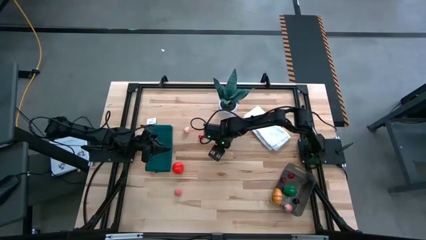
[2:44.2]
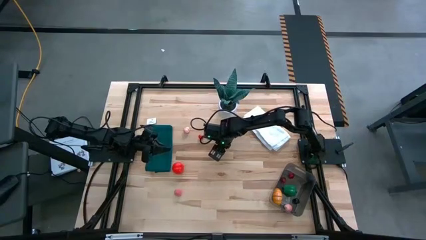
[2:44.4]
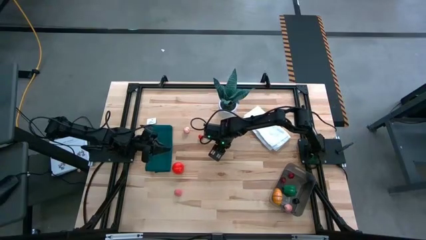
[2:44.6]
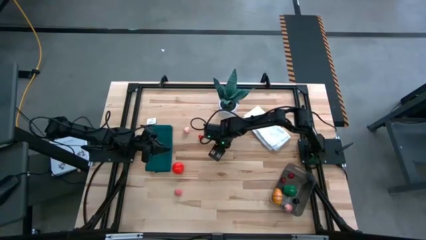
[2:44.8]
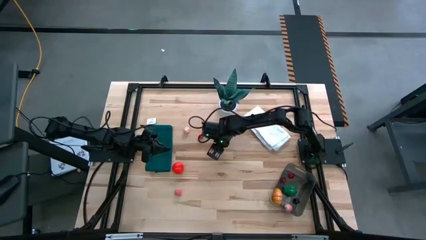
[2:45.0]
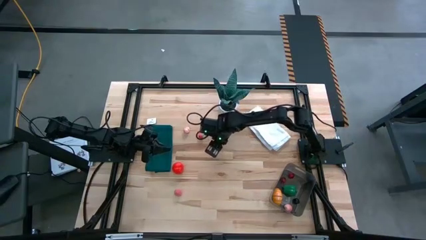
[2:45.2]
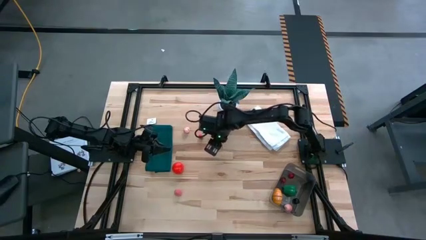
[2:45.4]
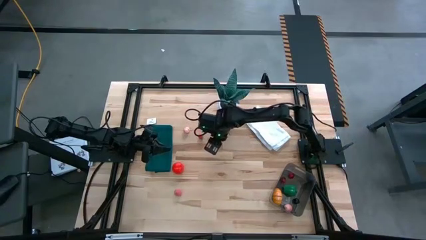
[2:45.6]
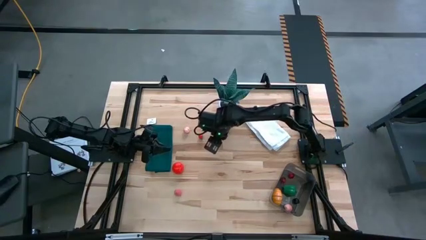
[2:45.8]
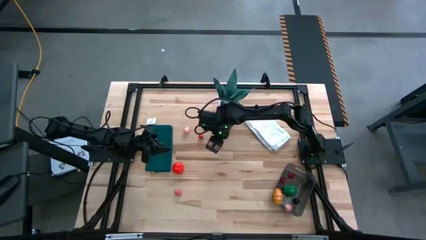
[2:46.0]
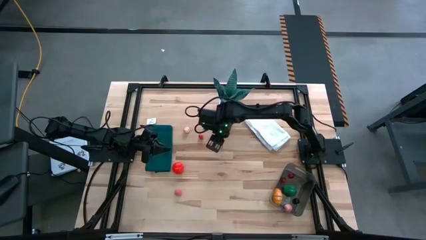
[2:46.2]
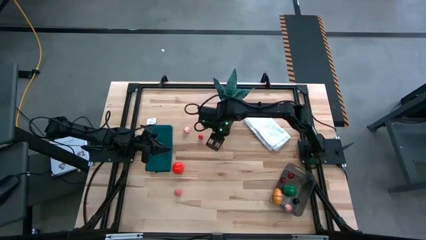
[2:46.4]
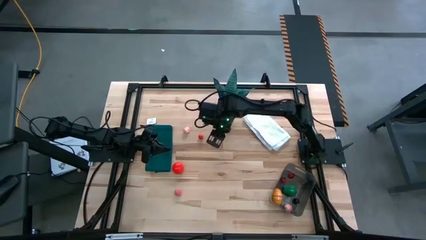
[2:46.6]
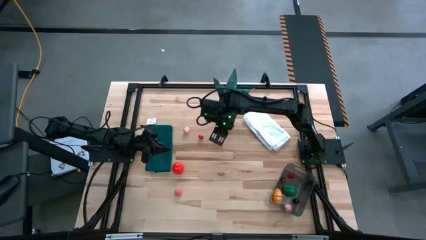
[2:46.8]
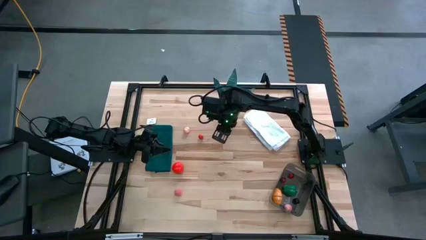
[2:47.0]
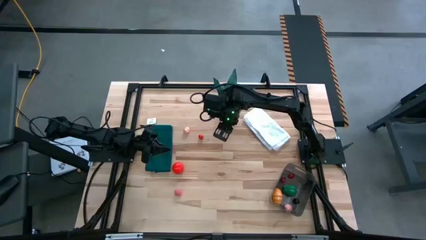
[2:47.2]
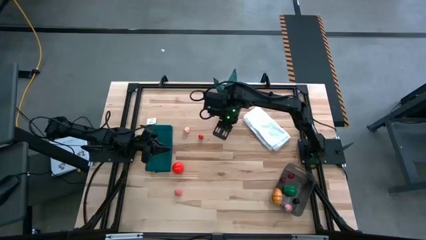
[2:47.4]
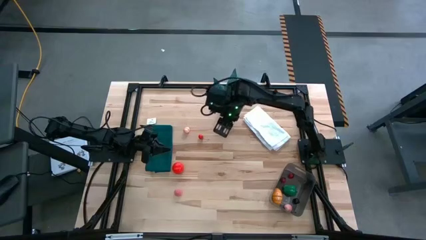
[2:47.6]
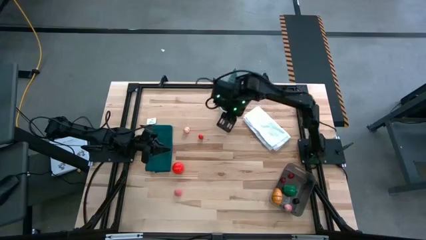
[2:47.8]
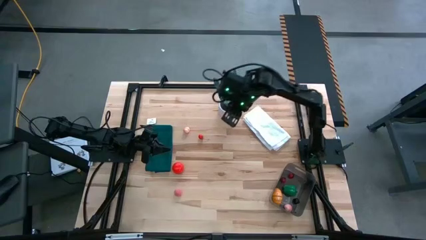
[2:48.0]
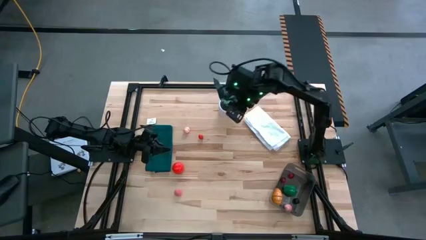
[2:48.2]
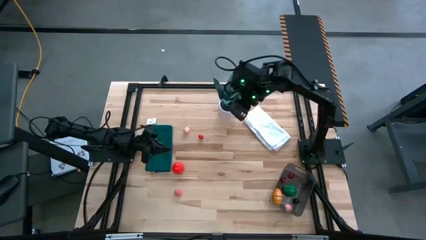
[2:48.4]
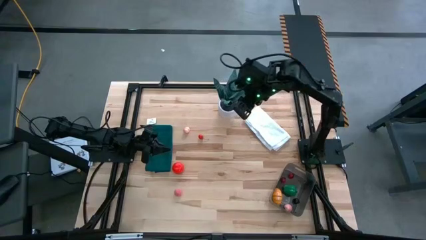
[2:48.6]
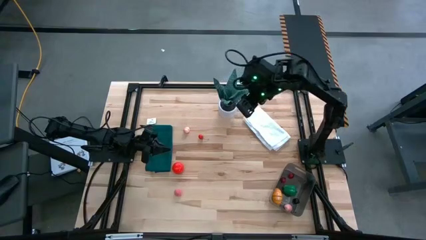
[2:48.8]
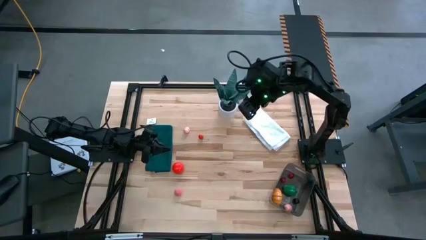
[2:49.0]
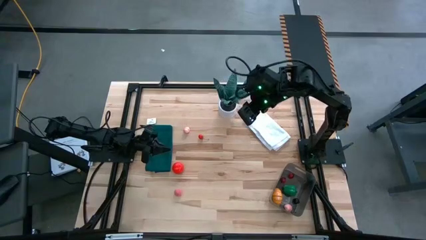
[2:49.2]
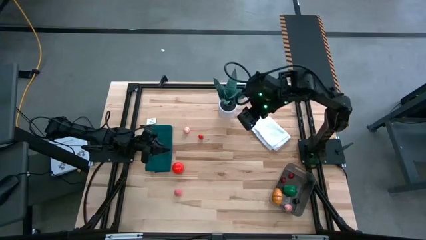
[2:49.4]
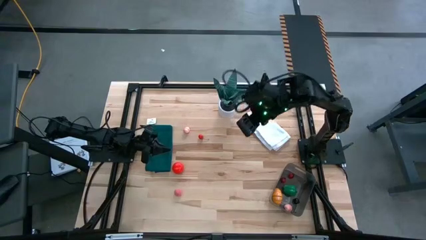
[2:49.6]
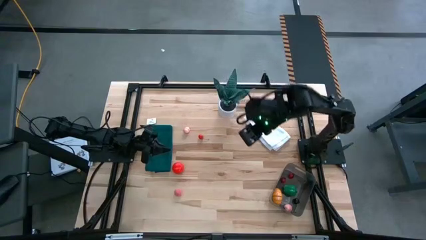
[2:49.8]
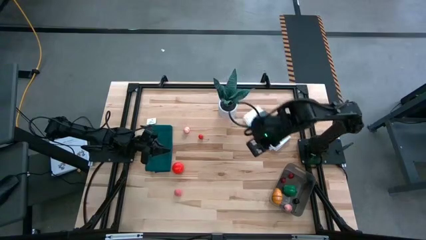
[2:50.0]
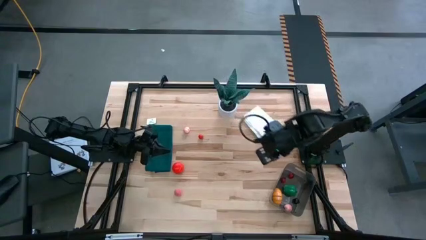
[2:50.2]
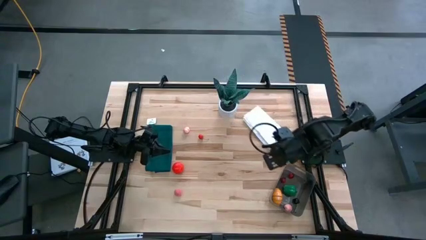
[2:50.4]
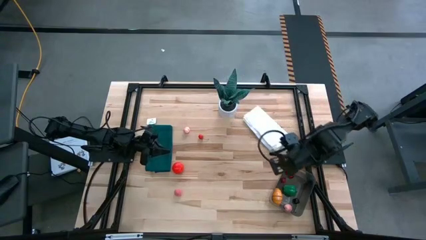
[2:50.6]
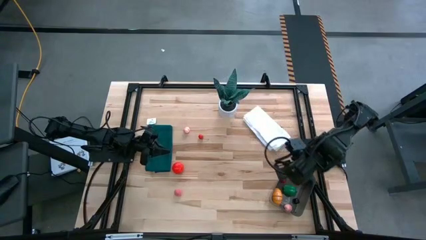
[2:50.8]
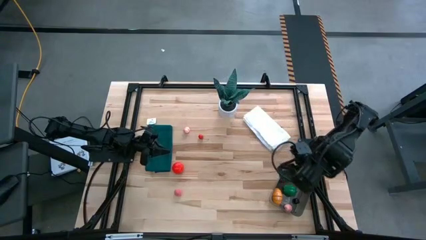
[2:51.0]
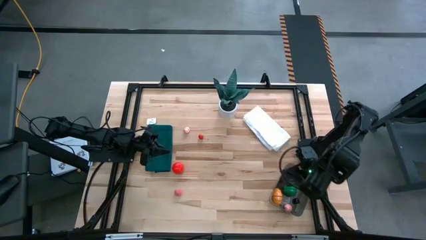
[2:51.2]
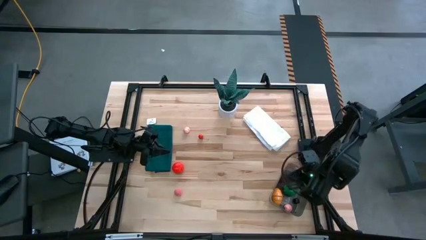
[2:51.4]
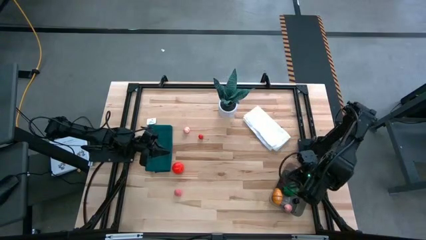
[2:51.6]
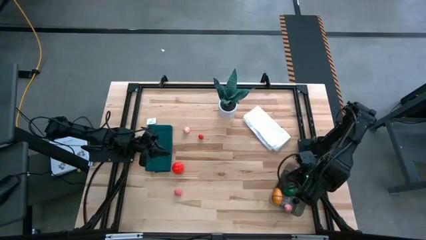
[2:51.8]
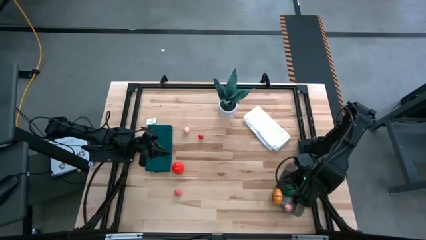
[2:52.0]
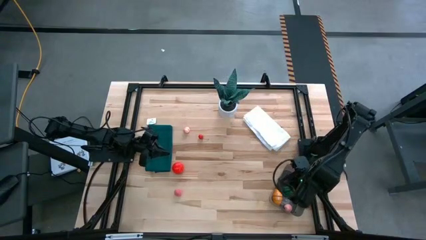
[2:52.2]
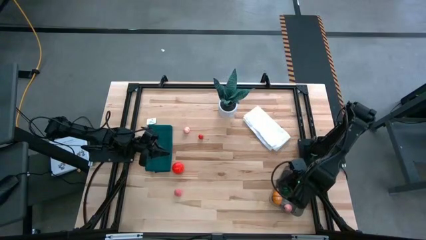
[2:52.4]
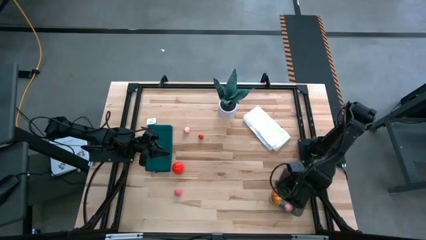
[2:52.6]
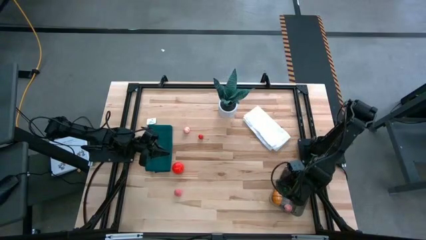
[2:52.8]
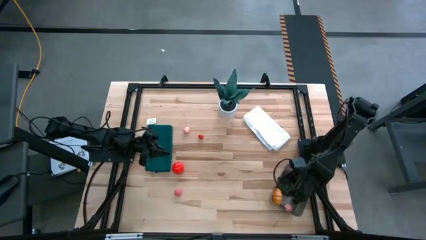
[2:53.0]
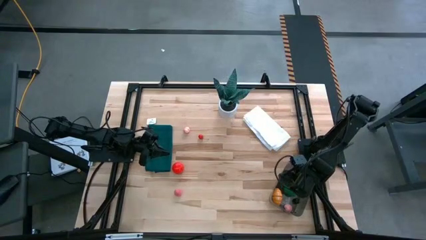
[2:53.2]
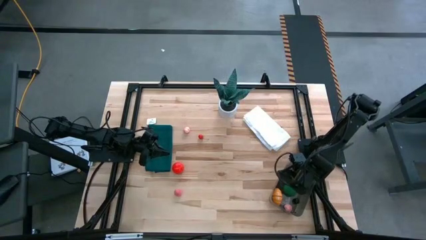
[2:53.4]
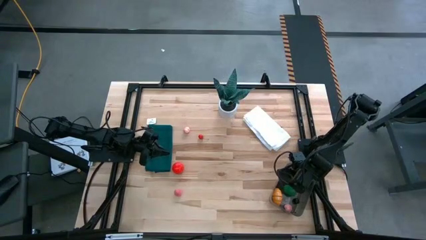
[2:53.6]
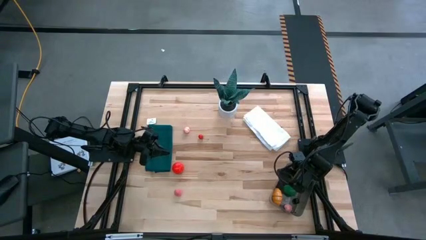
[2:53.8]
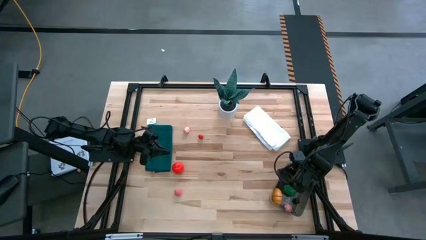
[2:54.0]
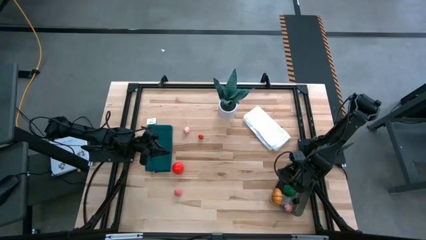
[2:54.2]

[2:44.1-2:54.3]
Task: Pick and placing Produce into tupperware
Put the red raspberry into the black bin

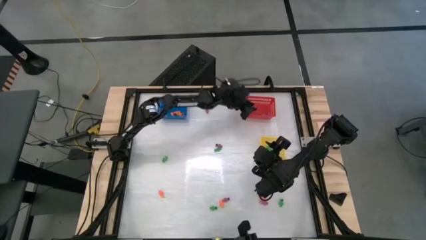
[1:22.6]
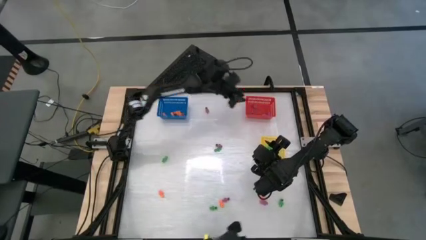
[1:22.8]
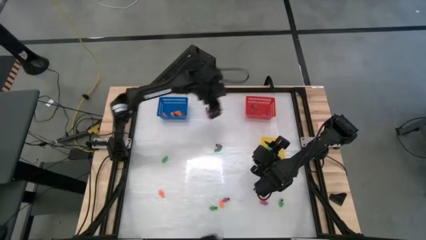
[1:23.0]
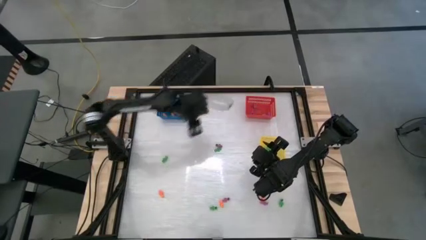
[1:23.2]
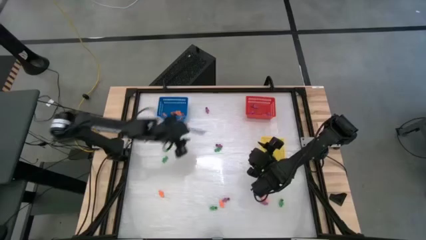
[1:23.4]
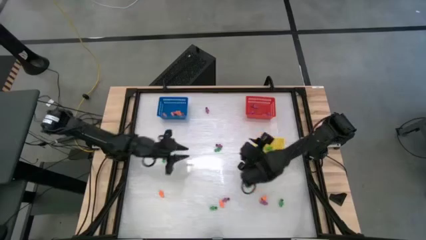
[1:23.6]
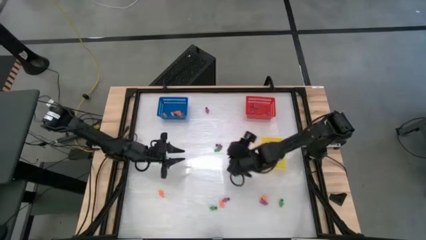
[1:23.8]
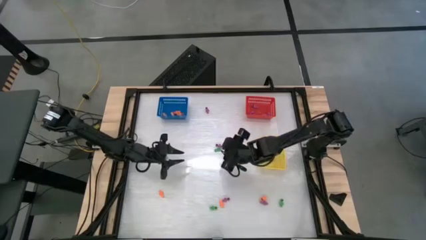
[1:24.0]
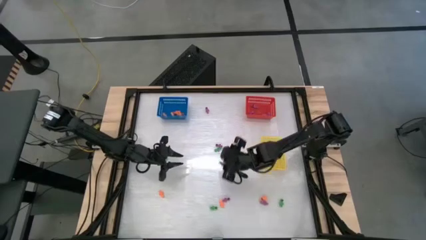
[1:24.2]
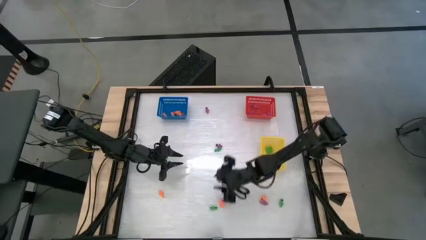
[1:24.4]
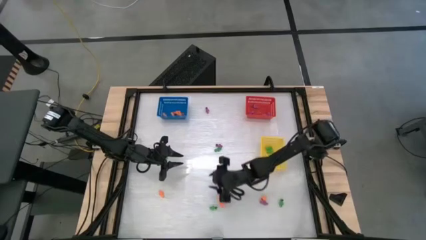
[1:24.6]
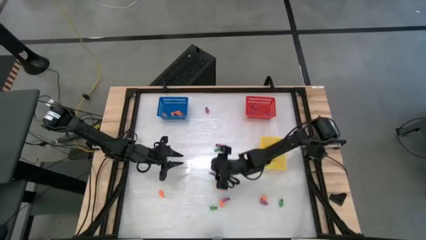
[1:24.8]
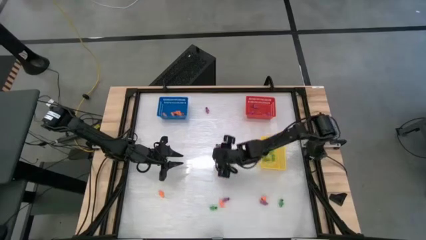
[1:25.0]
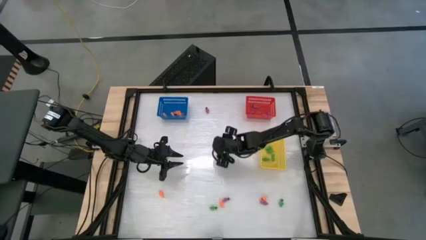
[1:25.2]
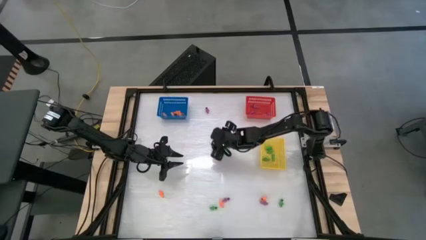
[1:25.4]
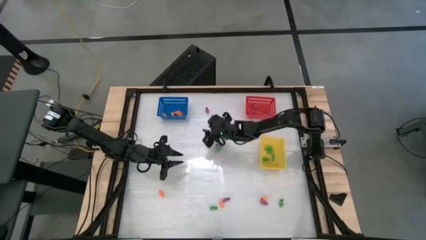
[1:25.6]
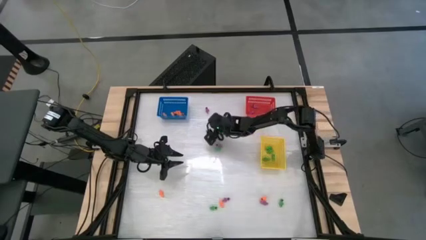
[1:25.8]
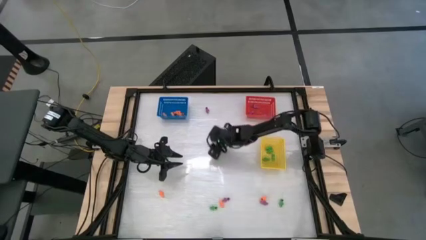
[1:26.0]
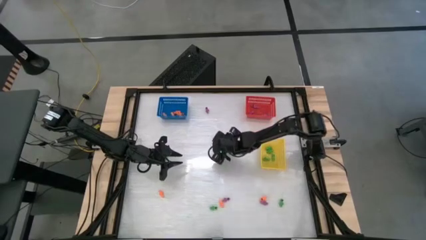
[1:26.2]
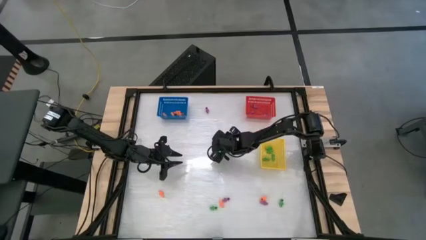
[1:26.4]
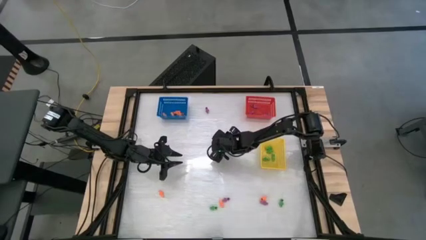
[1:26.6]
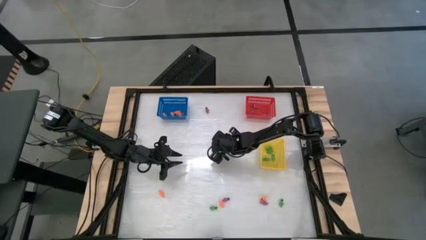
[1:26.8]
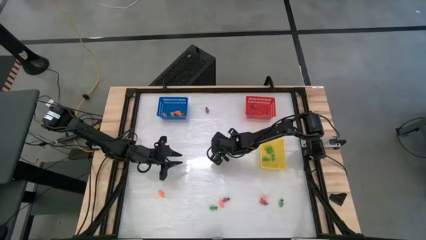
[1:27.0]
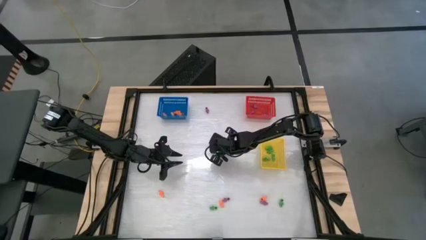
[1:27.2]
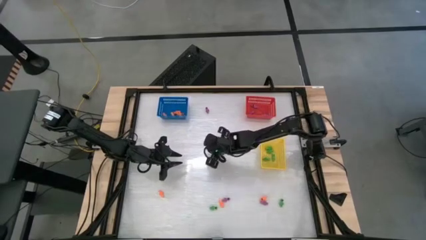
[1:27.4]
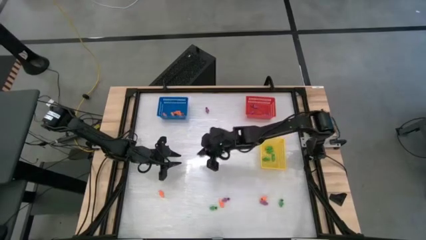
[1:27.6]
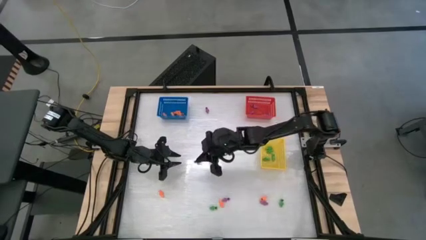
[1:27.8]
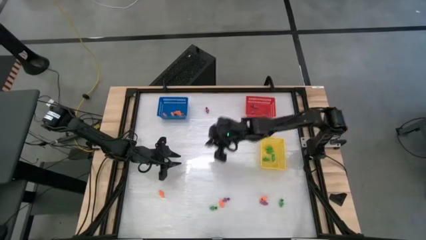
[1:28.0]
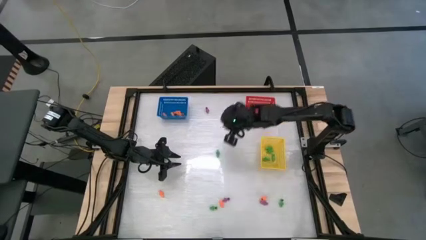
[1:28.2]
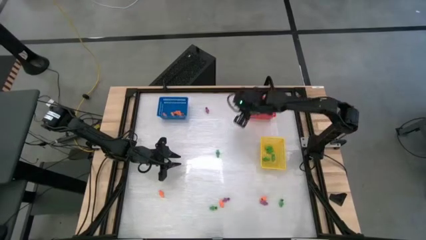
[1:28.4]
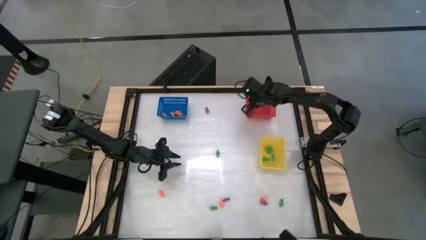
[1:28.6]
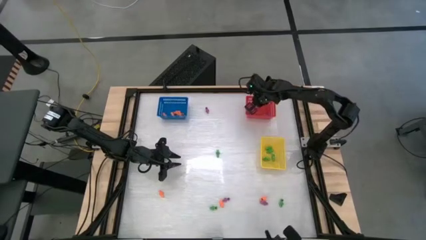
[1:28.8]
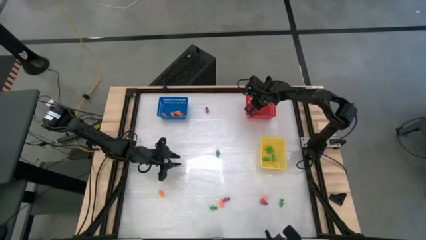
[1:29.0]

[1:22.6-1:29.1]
Task: Sort Halloween decoration
Put the purple skeleton toy into the red bin
